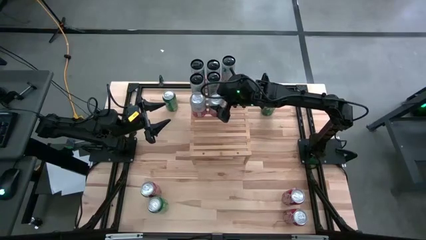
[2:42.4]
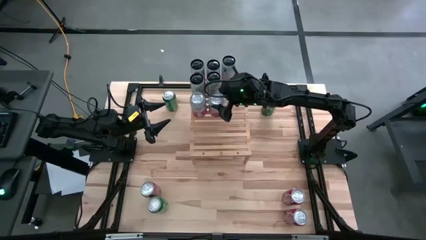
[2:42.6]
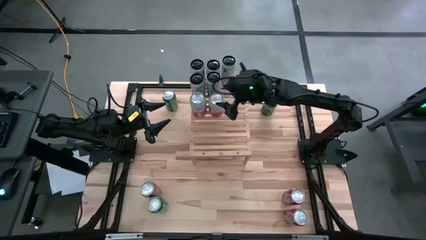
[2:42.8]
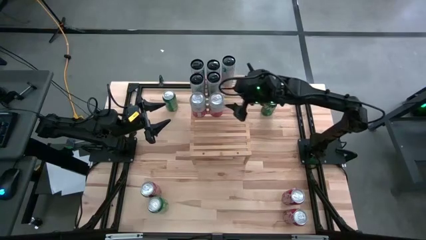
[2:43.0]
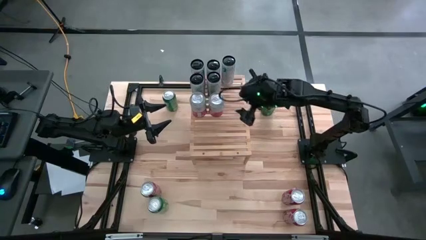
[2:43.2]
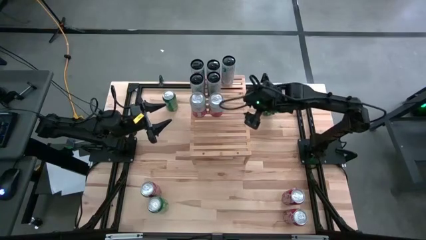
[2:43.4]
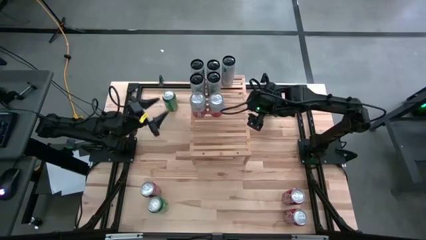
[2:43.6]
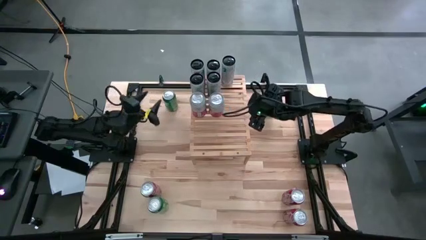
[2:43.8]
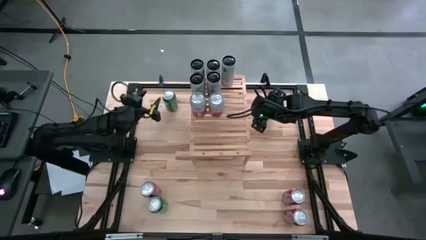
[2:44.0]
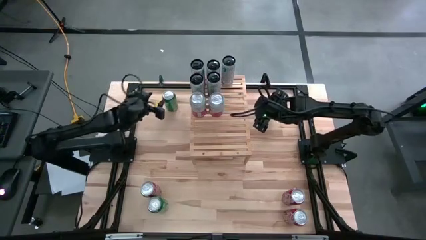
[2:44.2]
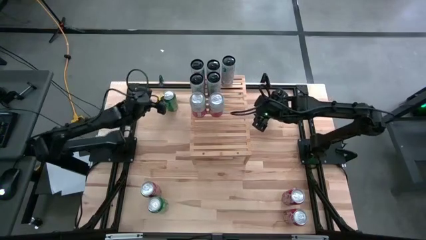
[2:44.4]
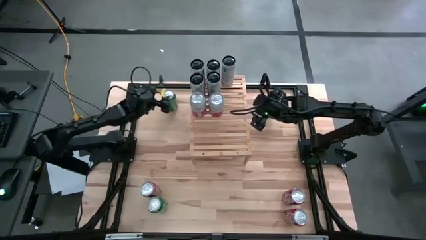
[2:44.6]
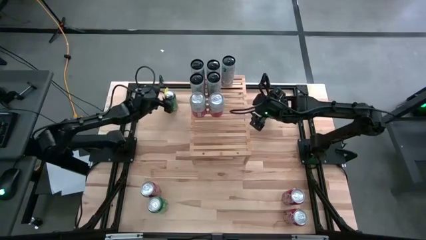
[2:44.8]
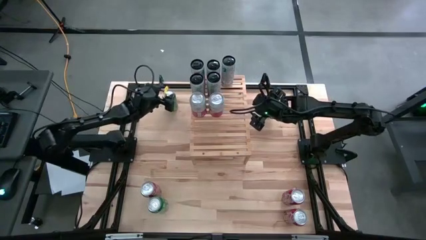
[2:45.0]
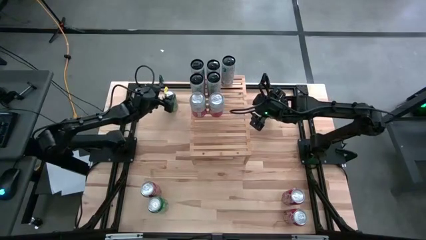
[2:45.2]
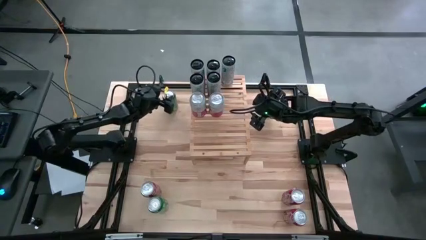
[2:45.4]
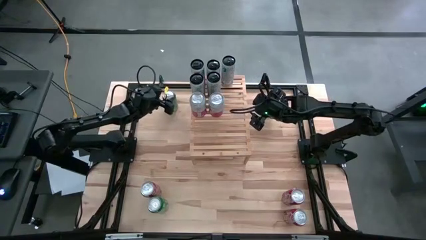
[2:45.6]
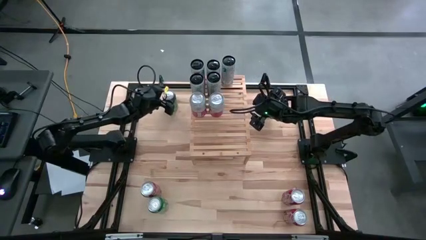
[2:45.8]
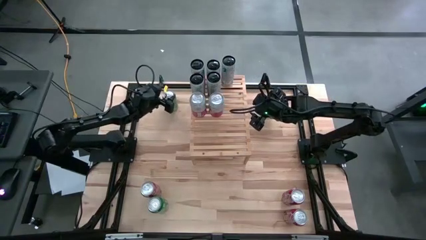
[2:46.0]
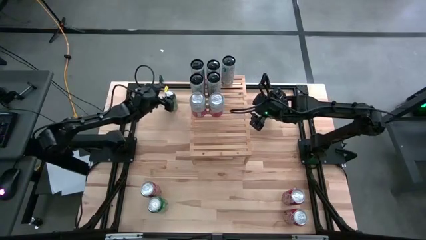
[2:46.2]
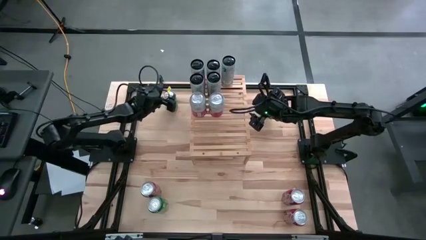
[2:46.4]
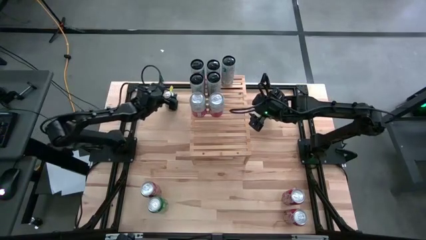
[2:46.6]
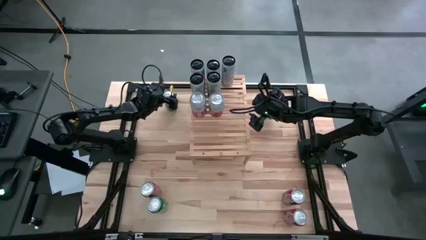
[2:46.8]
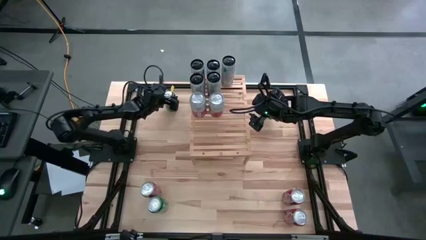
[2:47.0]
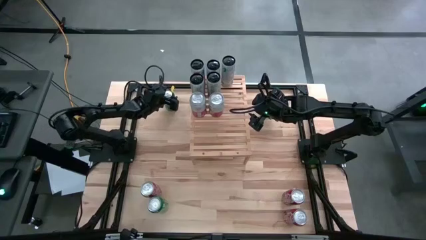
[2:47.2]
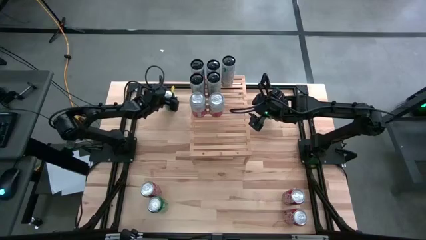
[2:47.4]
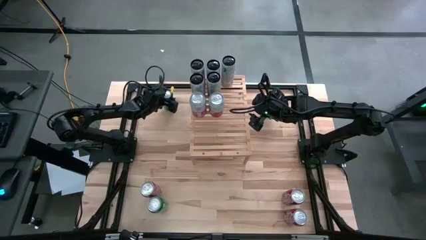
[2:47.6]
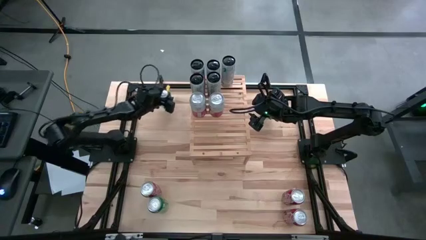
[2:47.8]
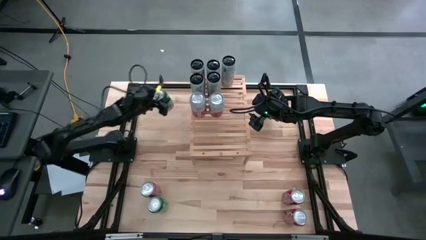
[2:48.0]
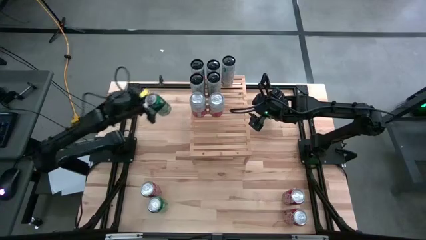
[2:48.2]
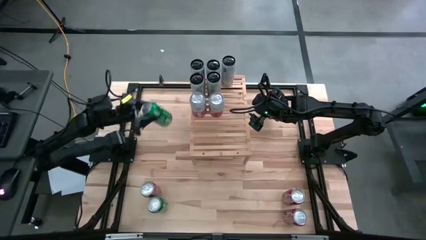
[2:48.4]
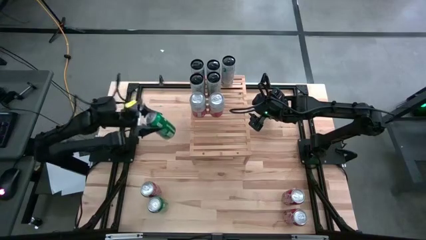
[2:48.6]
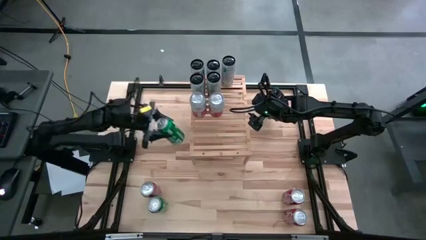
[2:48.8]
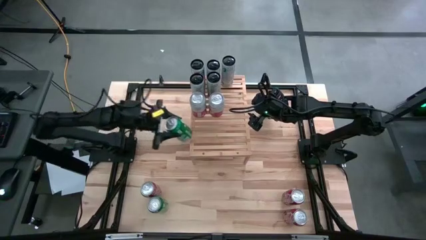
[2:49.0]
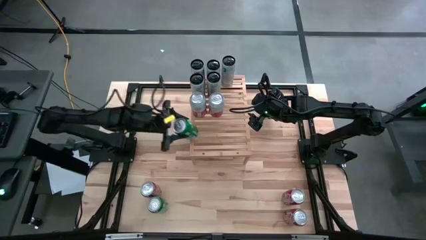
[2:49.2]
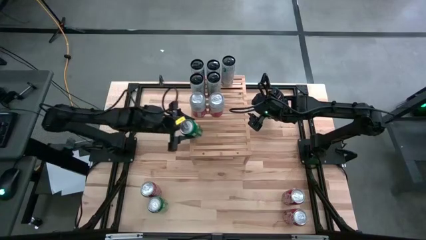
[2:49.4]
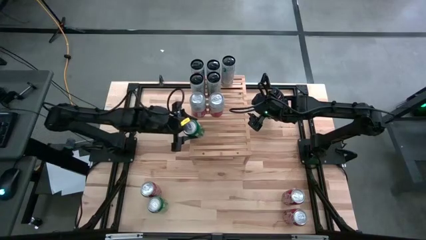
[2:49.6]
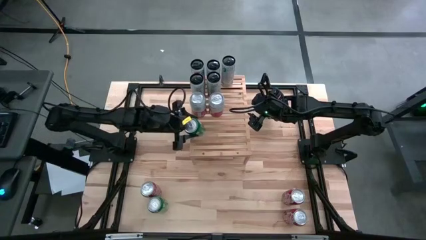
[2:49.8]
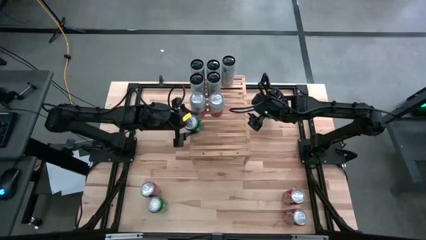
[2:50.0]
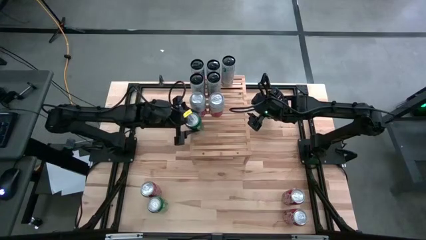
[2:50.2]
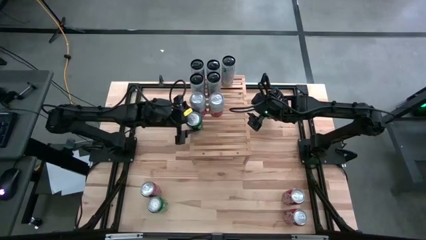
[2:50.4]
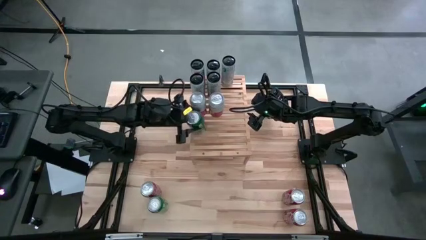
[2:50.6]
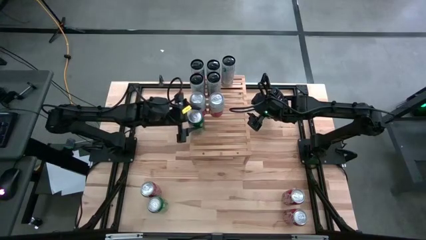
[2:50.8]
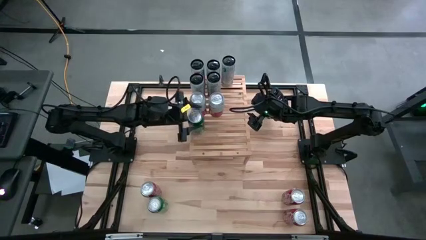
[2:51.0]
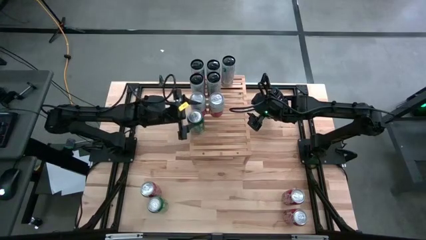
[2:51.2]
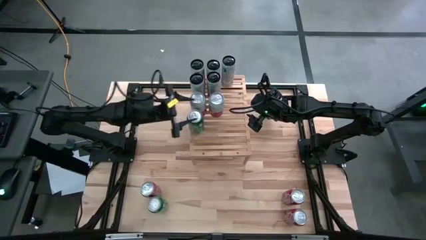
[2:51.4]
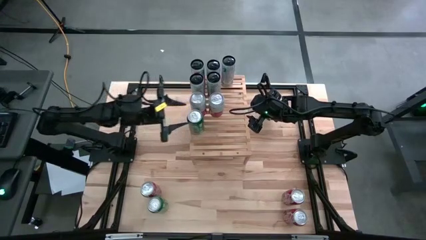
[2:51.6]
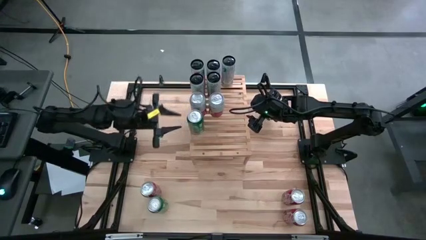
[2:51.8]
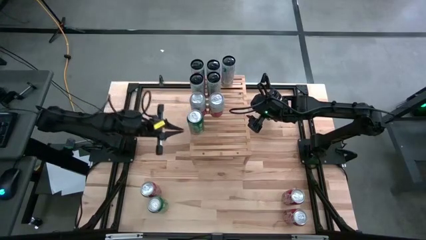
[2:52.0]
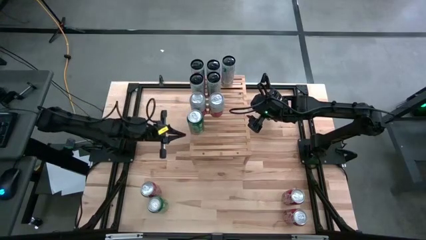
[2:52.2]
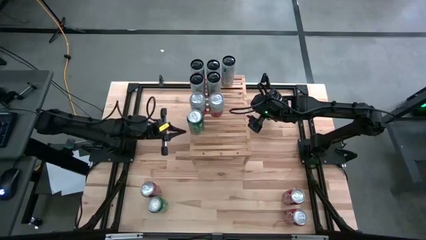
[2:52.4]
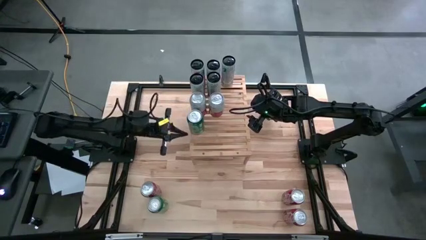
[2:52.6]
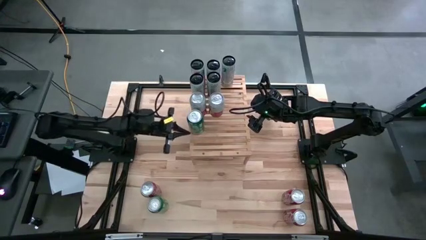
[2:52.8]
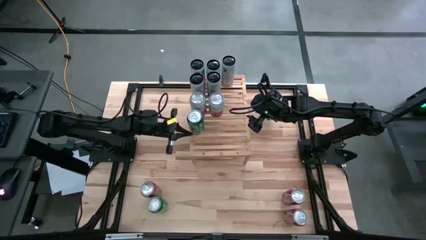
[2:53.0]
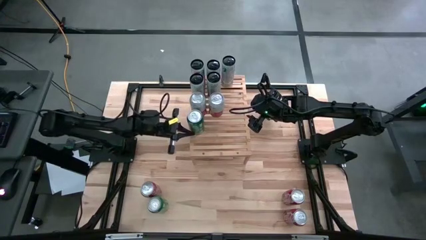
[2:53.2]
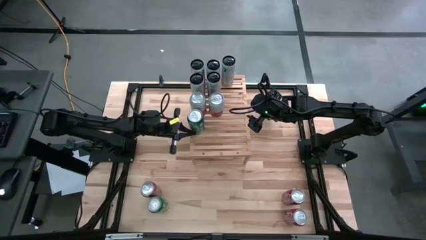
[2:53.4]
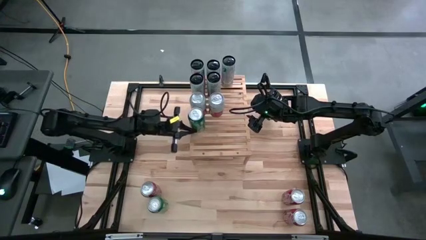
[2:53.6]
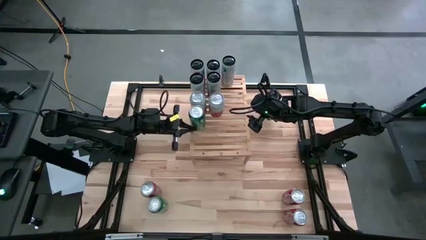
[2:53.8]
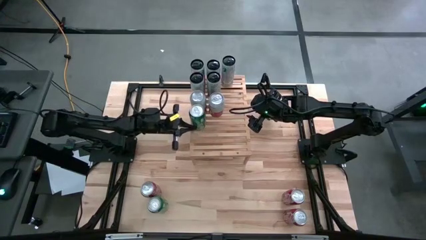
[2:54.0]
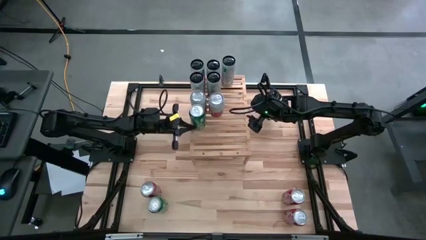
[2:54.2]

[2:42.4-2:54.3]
Task: Place canned beverage on shelf
Put the top left green soda can on the shelf

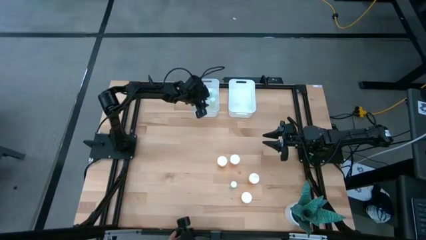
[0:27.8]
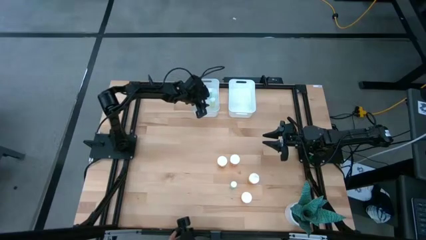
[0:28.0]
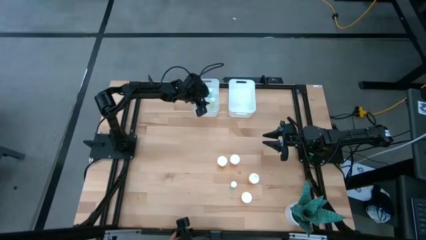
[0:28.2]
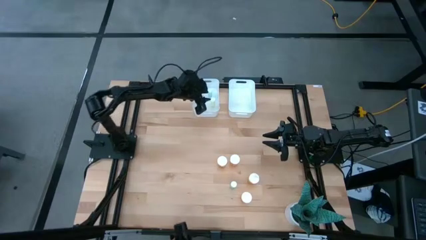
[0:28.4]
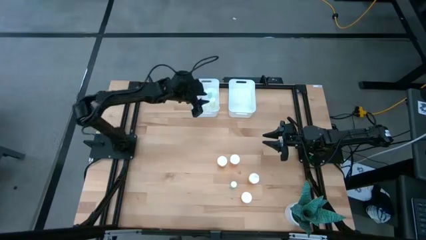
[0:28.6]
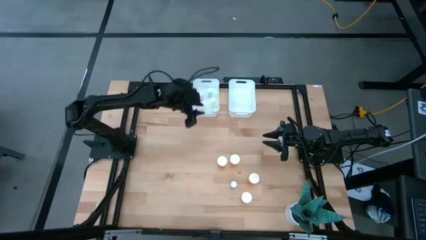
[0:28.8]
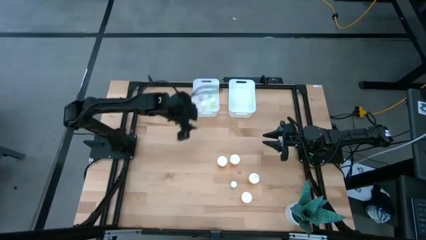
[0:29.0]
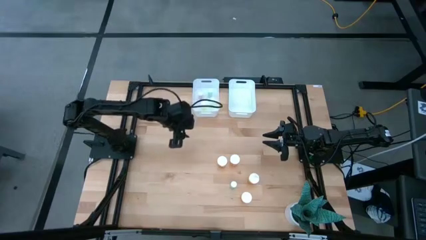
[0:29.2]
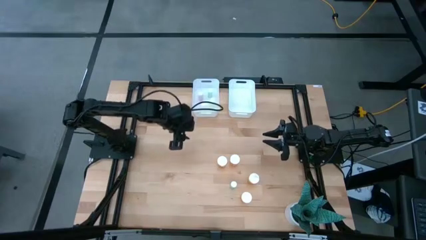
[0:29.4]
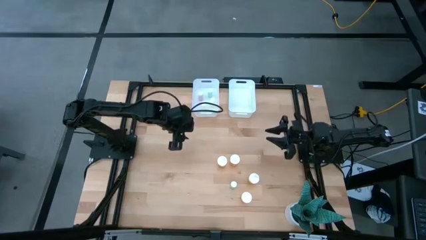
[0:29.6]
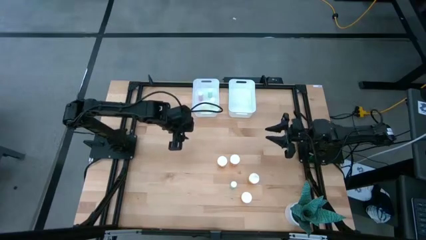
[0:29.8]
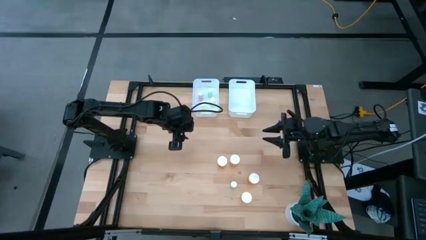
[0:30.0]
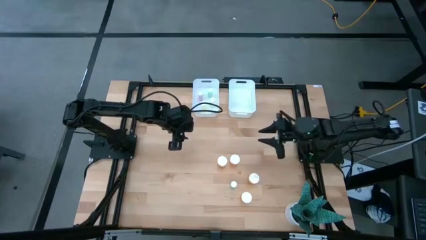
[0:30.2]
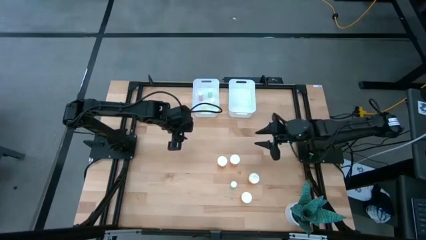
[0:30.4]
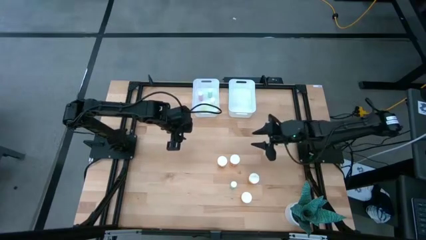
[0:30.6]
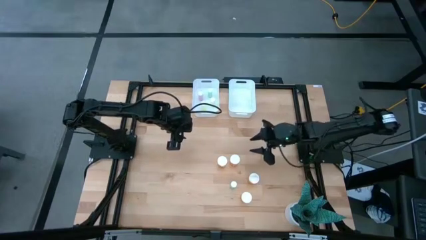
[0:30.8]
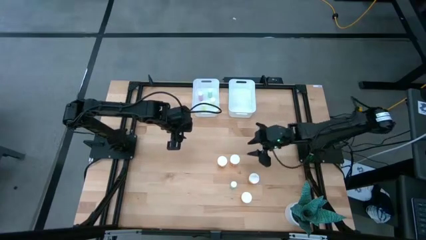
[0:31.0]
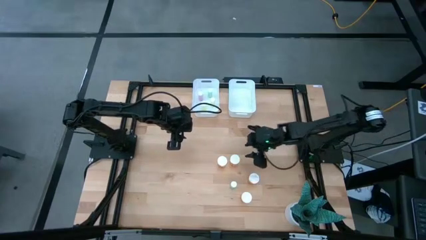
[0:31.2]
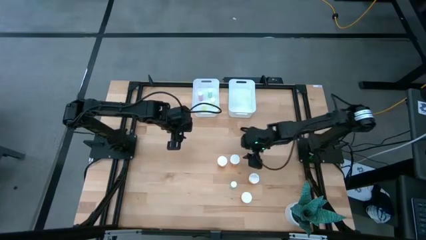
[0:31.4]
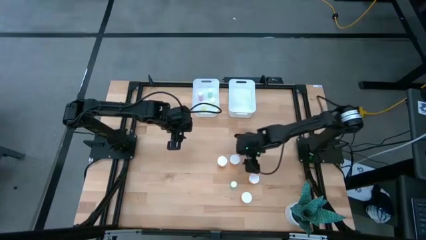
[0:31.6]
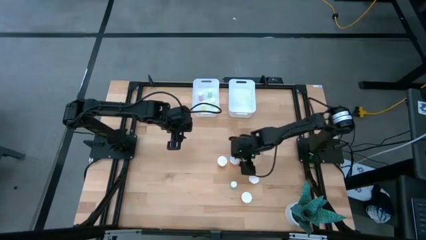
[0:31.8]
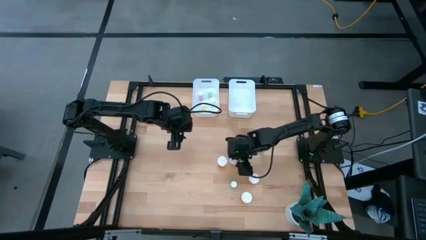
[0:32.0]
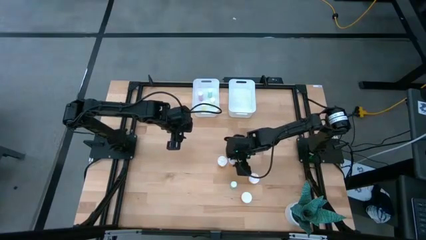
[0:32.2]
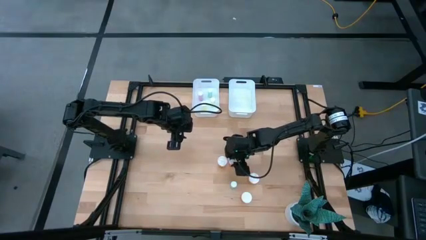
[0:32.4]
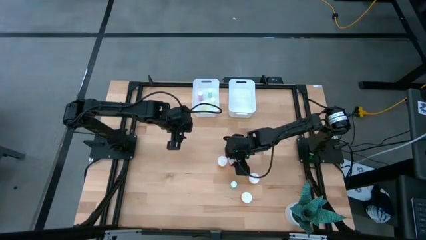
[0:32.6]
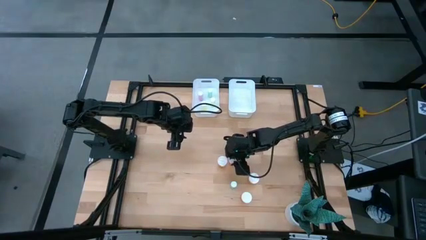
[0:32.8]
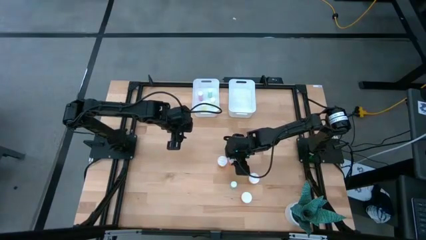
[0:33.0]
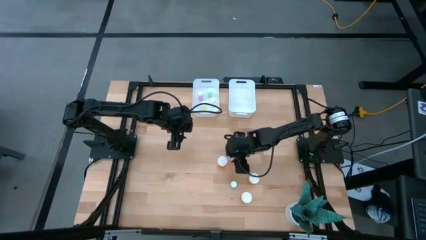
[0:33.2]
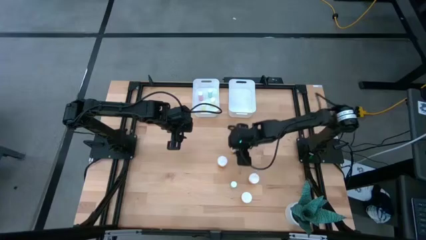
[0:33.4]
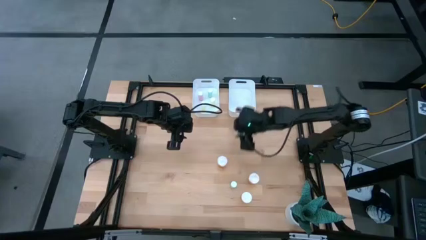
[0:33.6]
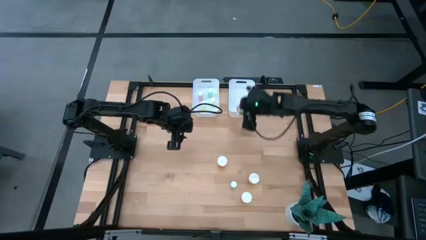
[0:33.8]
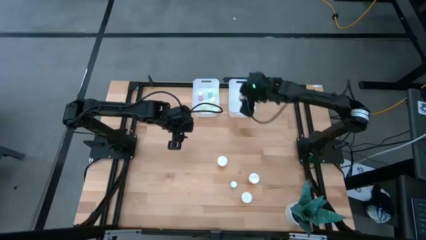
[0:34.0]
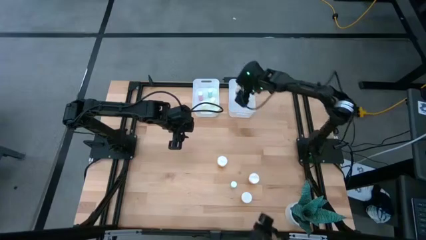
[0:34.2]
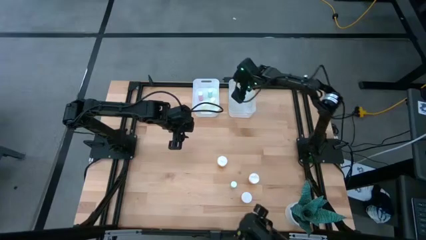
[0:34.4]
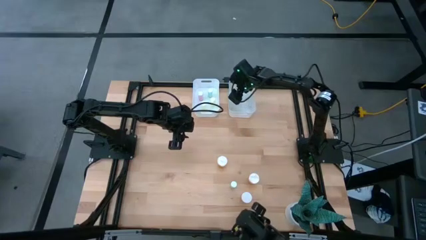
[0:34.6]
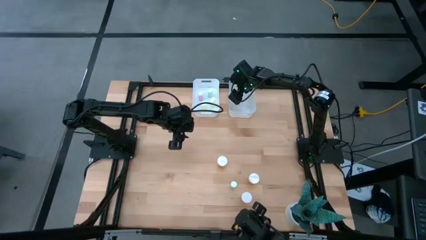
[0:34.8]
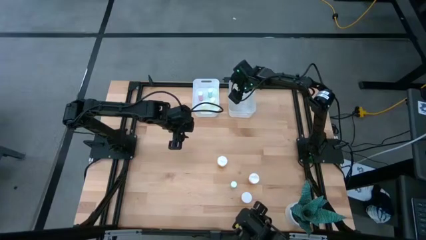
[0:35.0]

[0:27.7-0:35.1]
Task: Pick and place medicine bottles into bin by pill shape (circle, oval)
Put the orange capsule bottle into the white right bin
